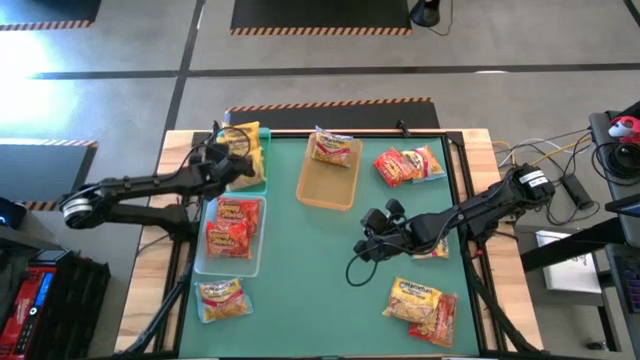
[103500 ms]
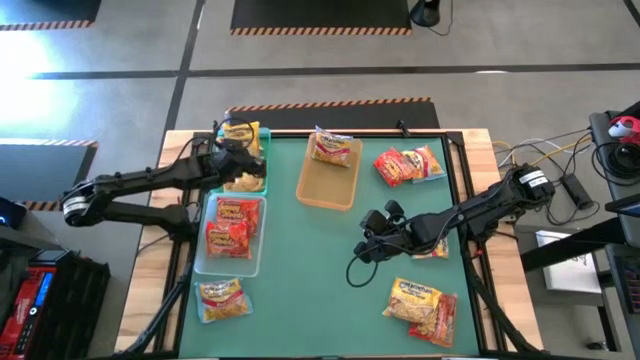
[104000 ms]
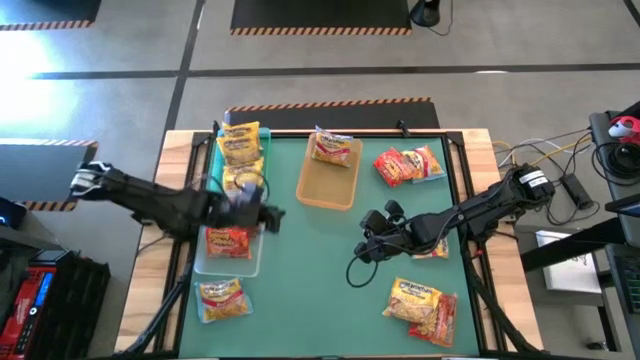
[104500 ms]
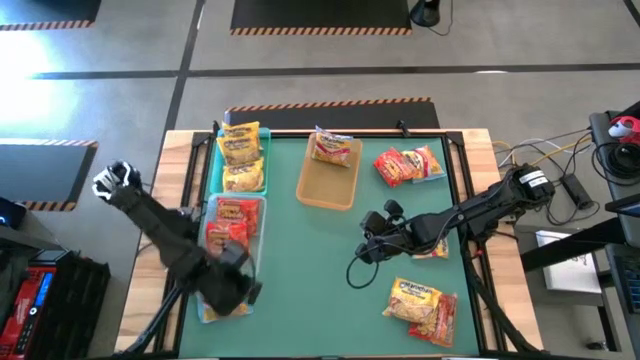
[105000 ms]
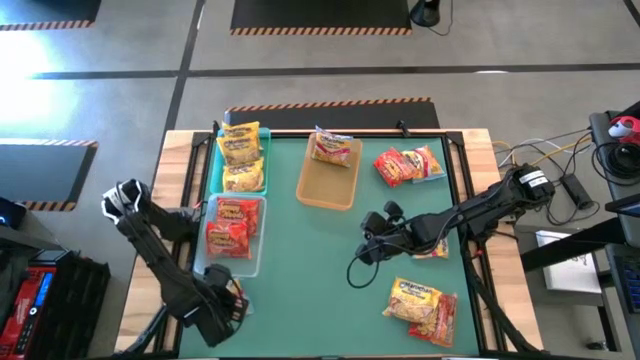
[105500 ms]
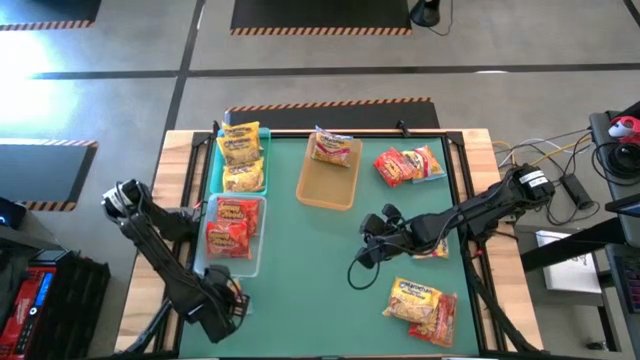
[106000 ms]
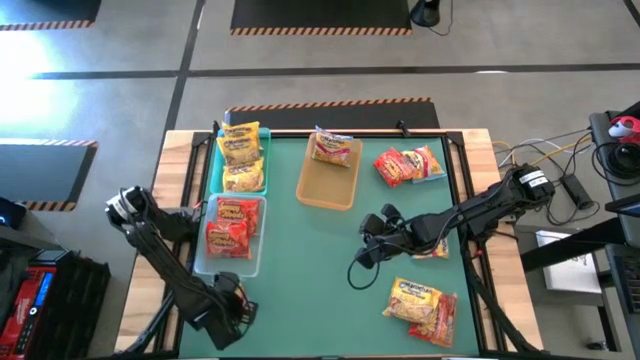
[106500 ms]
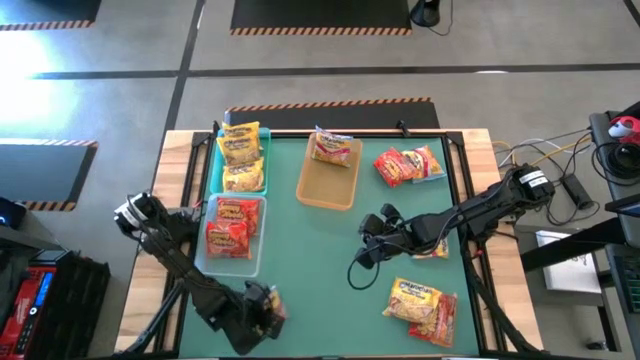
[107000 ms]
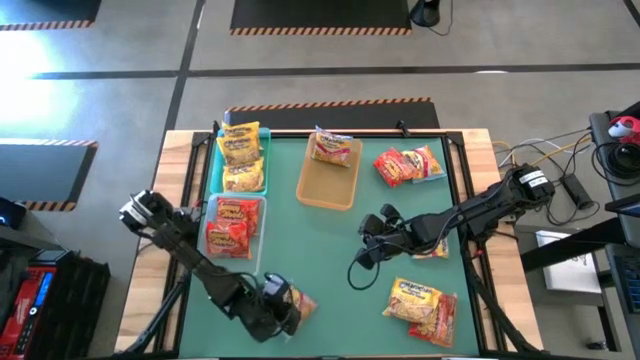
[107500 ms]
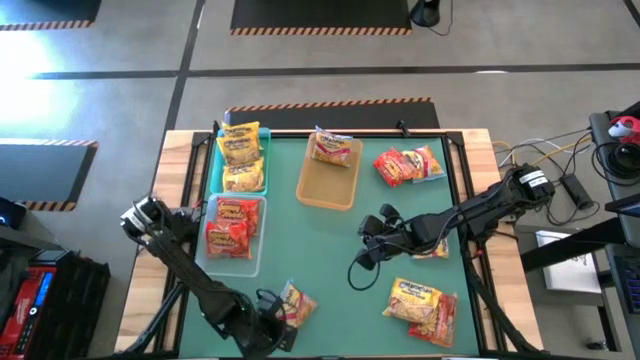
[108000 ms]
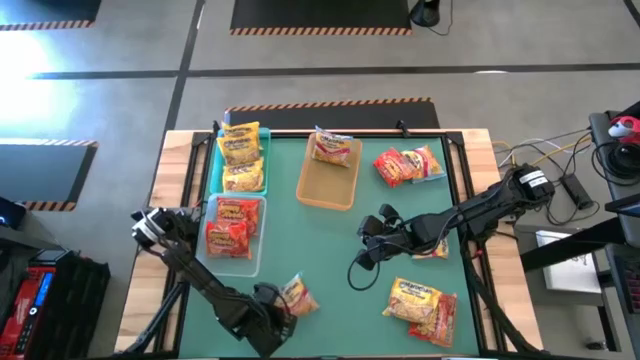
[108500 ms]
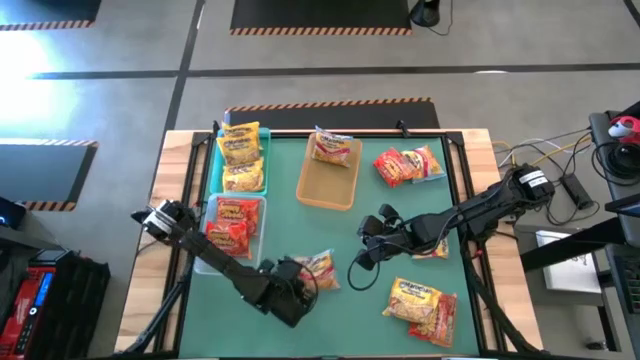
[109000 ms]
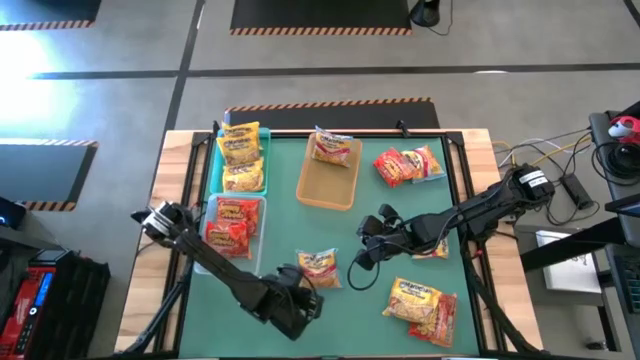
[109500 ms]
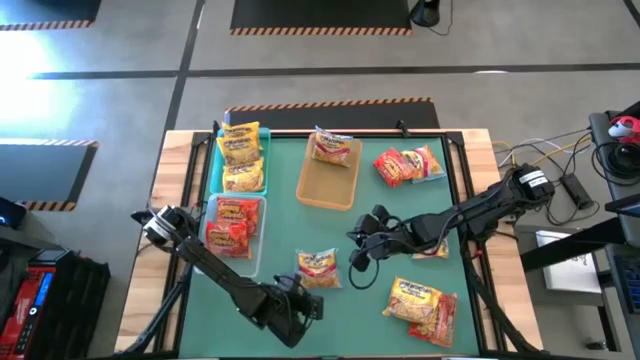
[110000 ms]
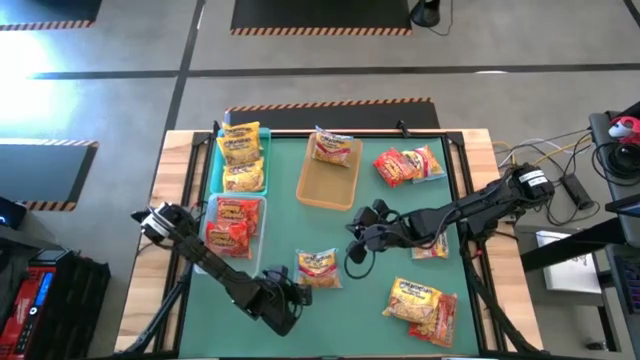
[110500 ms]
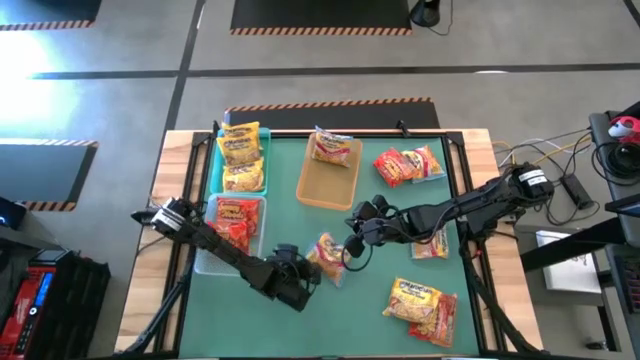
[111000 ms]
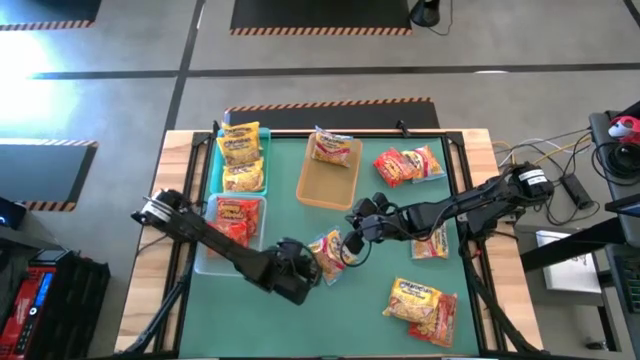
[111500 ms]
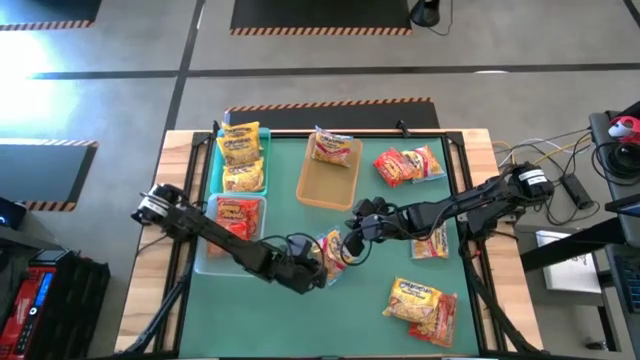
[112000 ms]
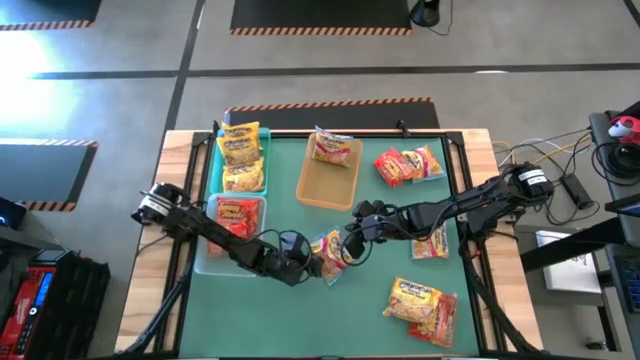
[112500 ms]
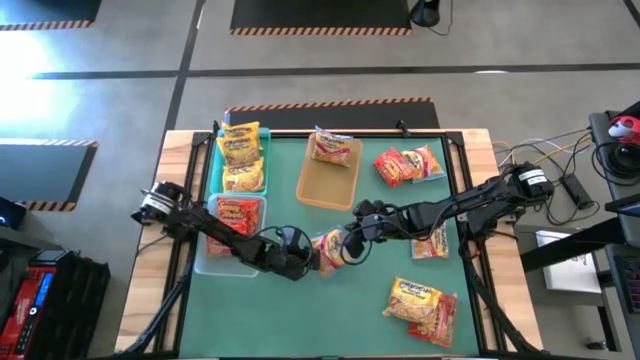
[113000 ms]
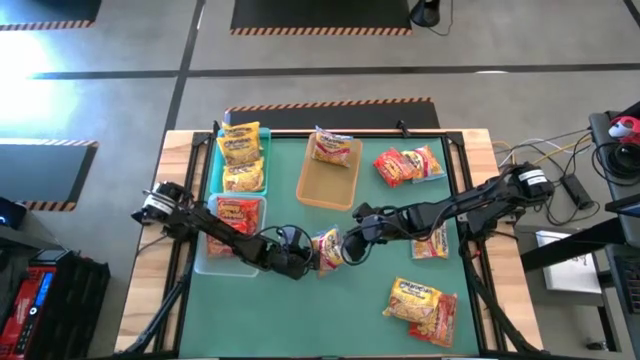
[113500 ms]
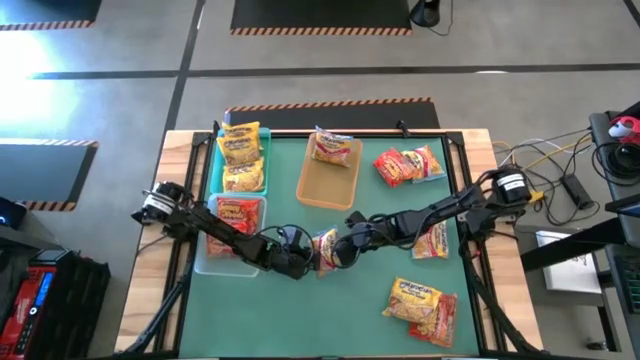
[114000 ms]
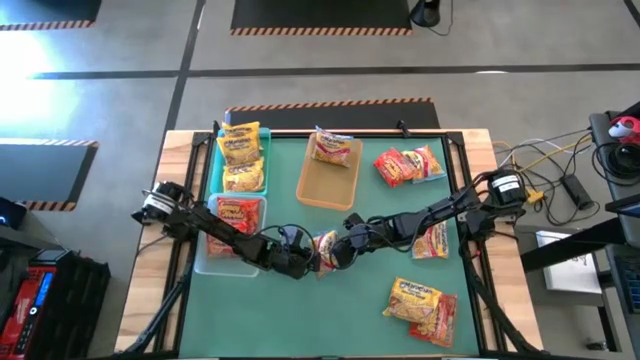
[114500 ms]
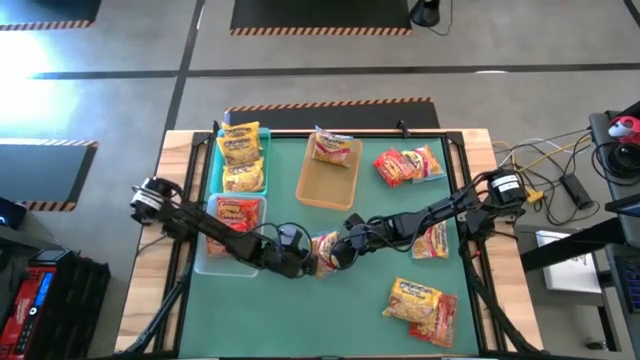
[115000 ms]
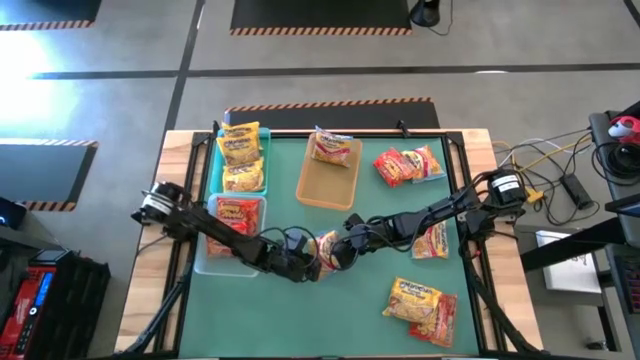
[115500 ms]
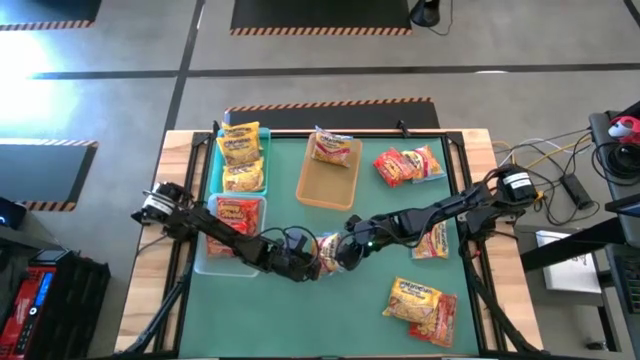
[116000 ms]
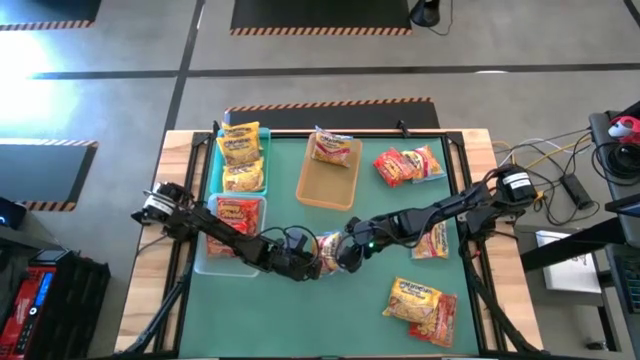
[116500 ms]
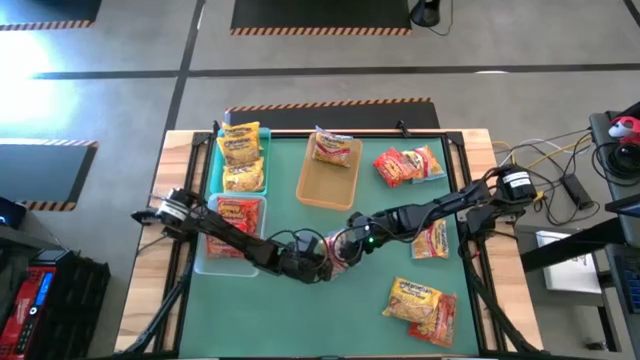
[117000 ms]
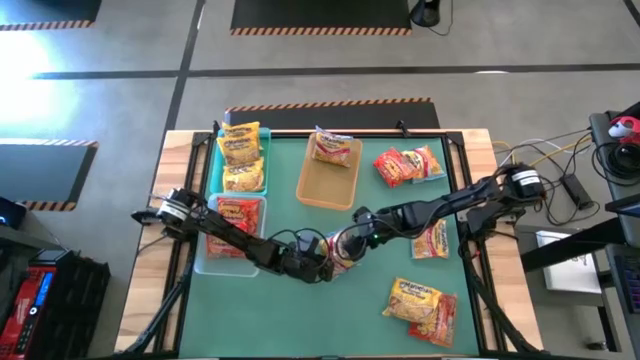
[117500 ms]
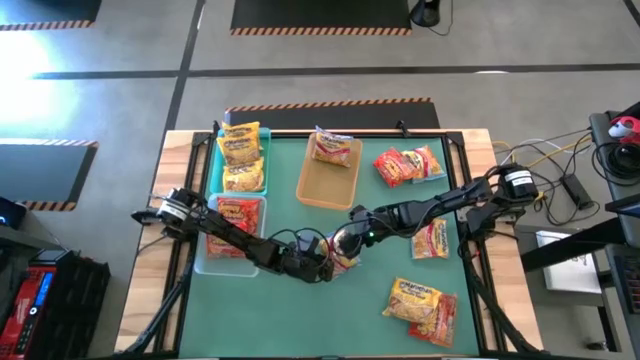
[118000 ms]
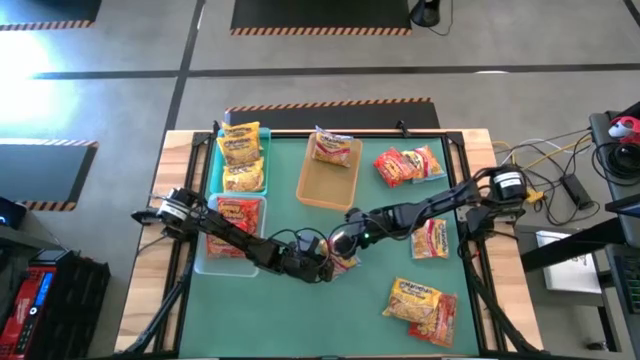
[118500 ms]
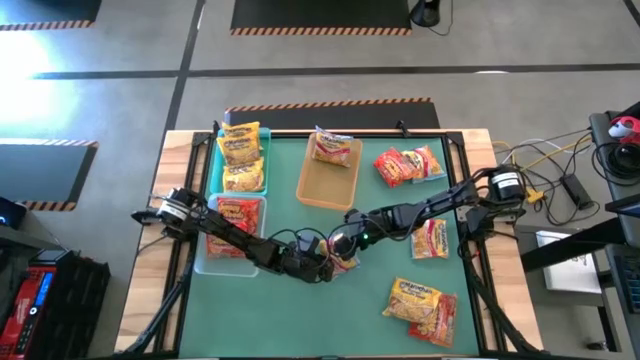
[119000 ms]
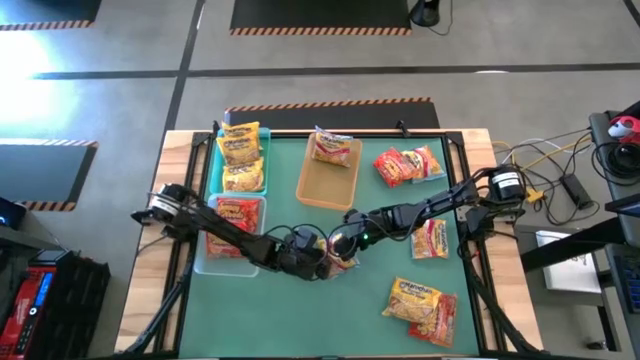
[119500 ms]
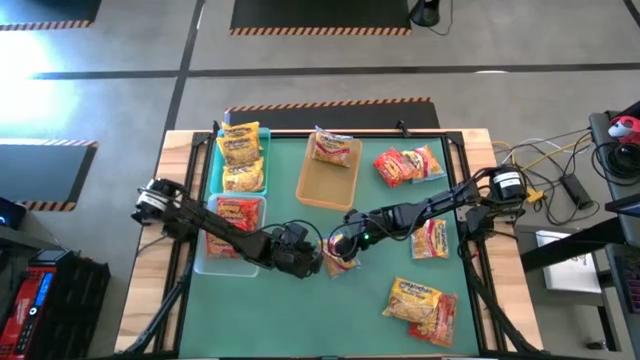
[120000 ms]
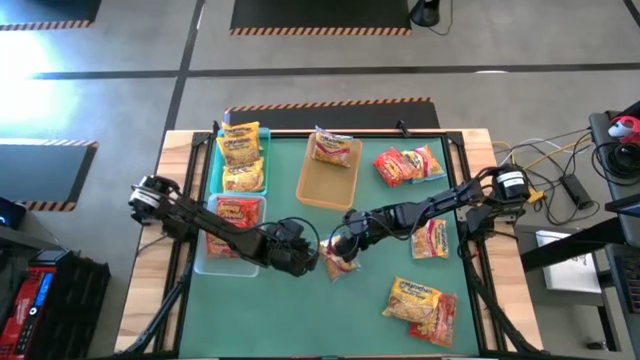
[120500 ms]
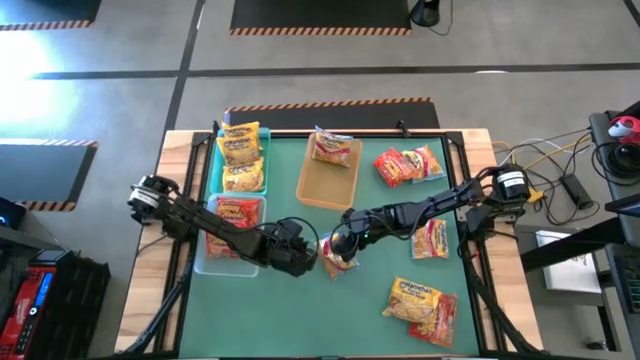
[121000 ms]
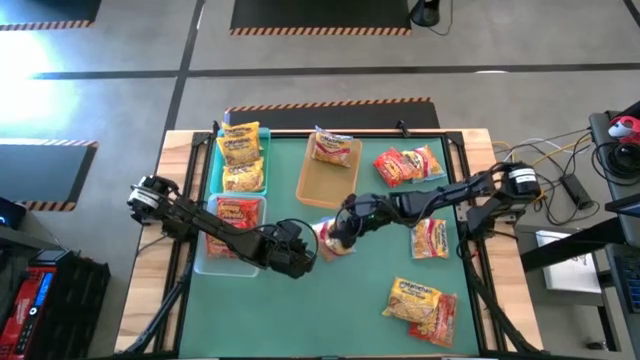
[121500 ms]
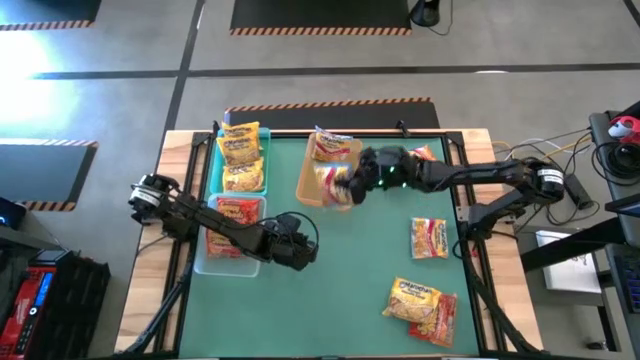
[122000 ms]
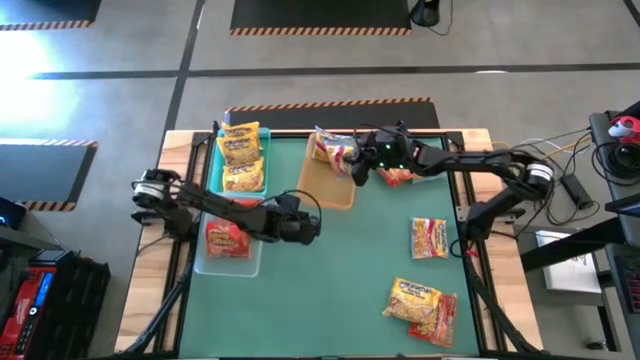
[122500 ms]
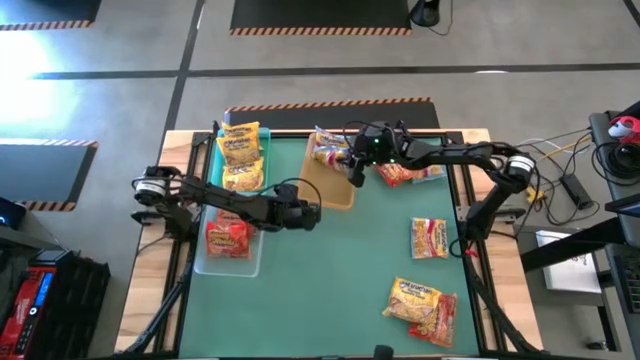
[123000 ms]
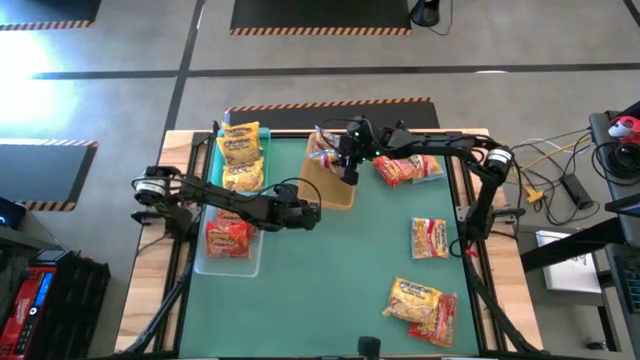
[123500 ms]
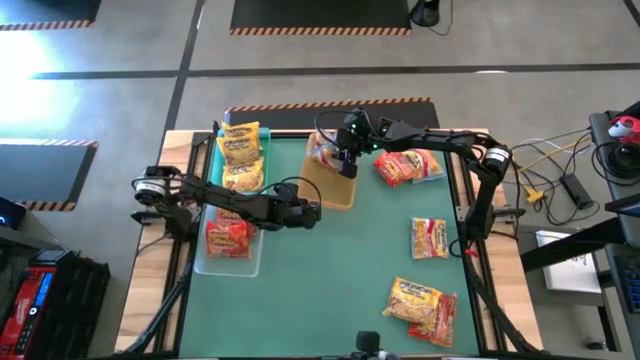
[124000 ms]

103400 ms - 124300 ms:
Task: Sort Maruchan noodles
Put the blue noodle pack into the orange bin

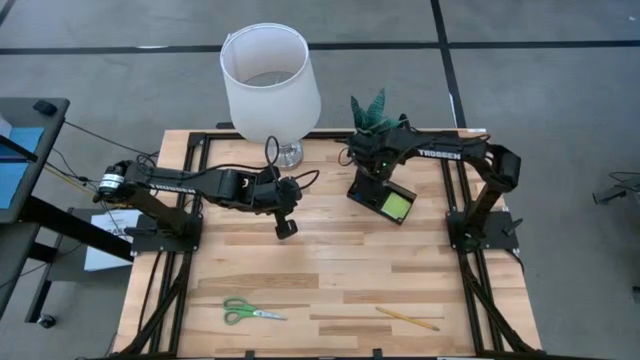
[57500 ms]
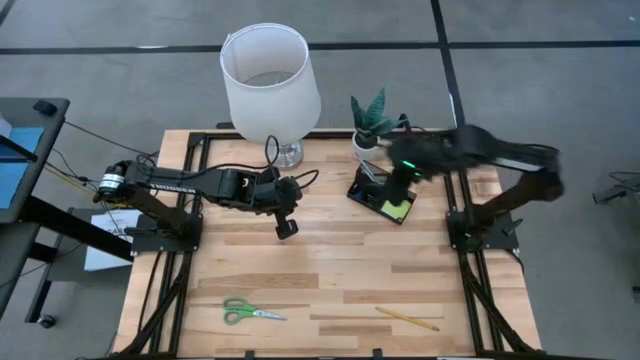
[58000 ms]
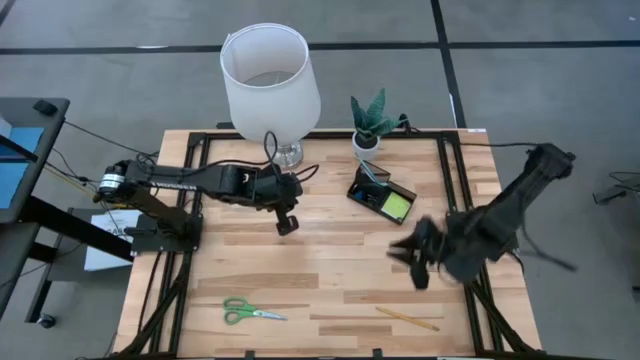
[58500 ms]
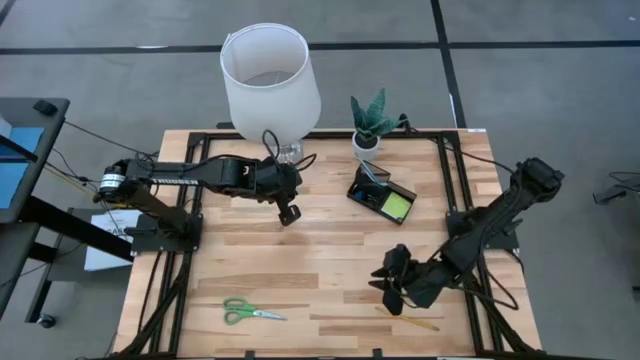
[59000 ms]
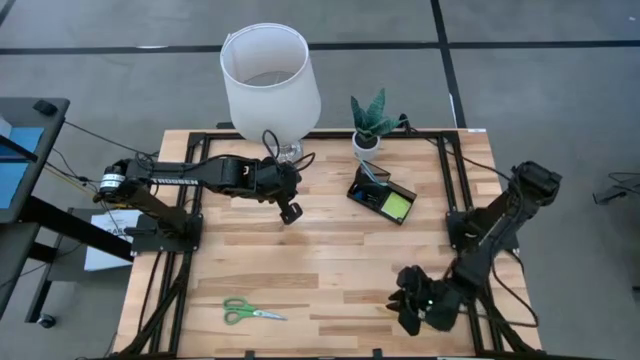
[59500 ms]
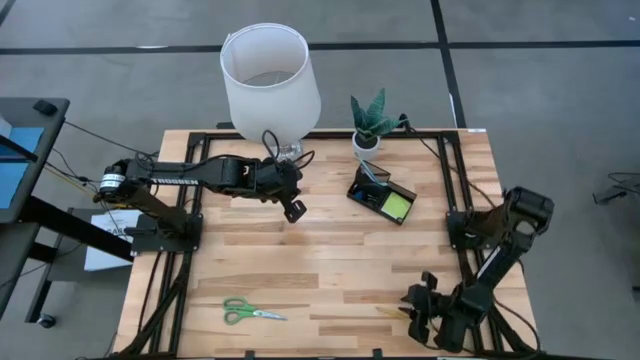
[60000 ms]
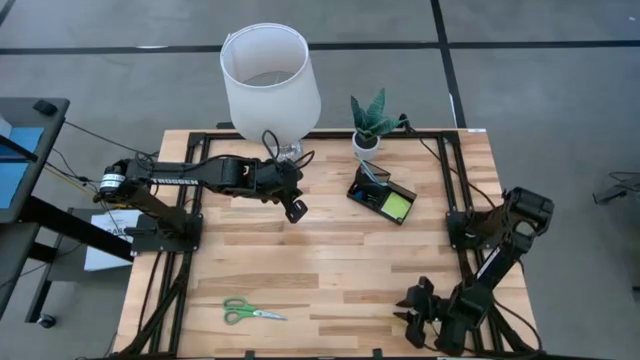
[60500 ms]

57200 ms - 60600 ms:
Task: Pick and place office supplies into organizer
Put the yellow pencil into the black organizer
